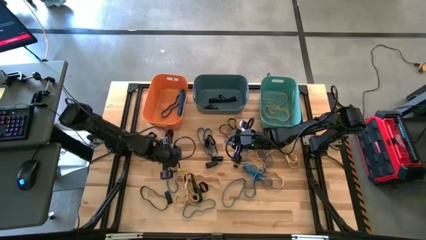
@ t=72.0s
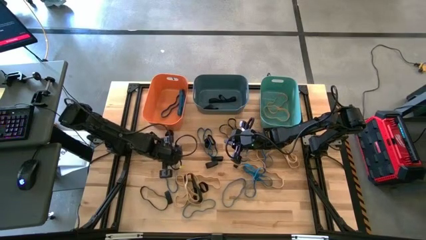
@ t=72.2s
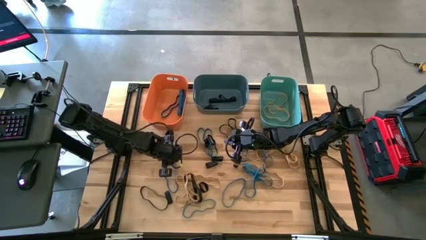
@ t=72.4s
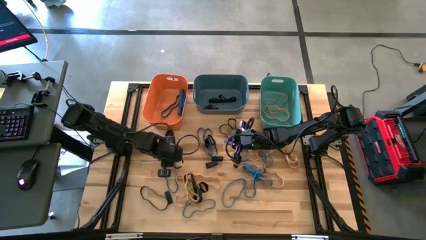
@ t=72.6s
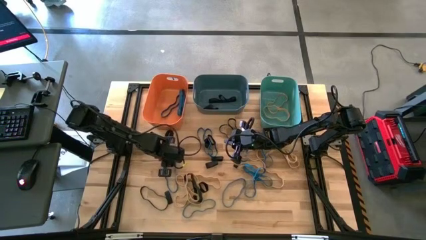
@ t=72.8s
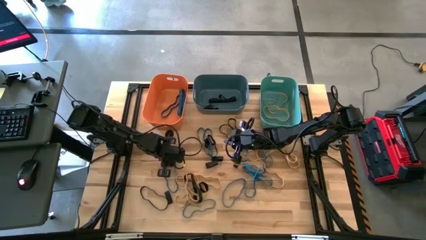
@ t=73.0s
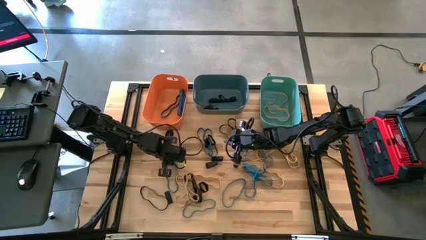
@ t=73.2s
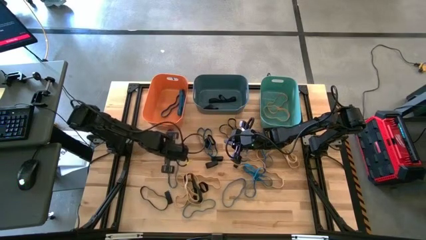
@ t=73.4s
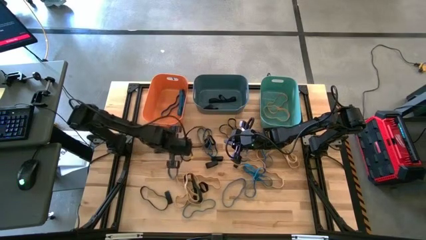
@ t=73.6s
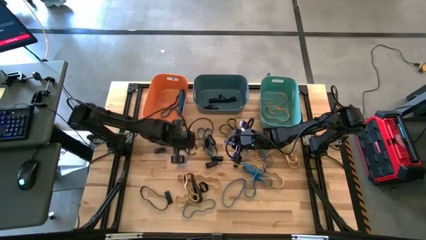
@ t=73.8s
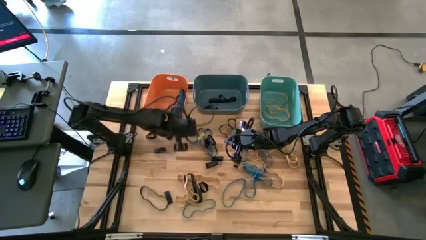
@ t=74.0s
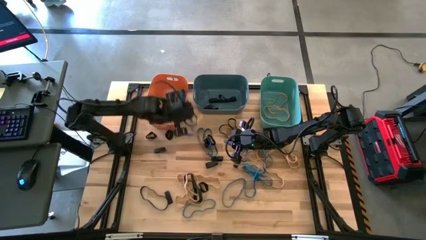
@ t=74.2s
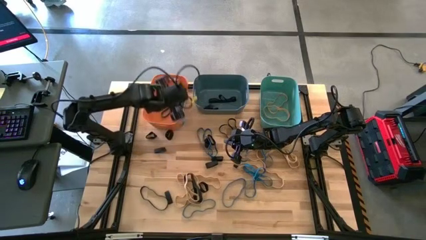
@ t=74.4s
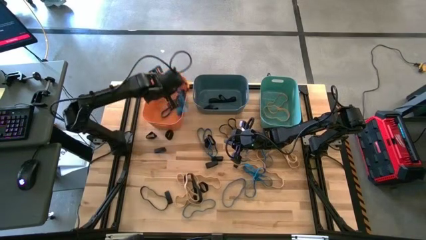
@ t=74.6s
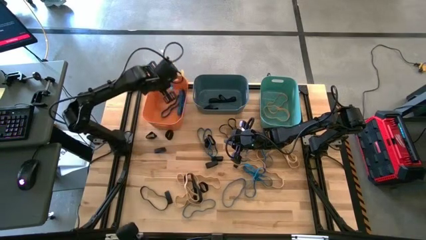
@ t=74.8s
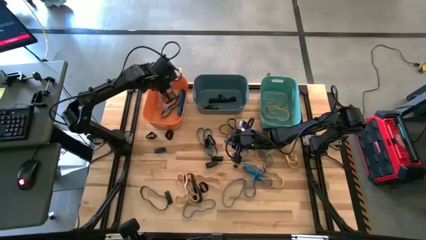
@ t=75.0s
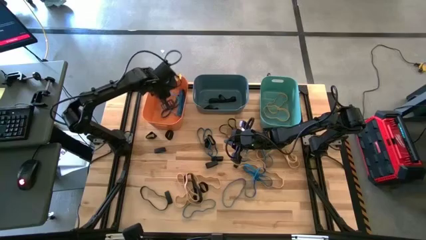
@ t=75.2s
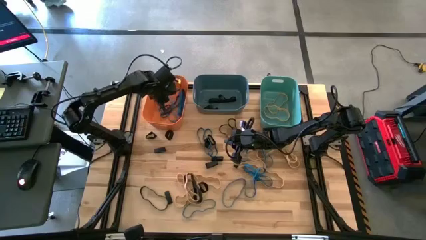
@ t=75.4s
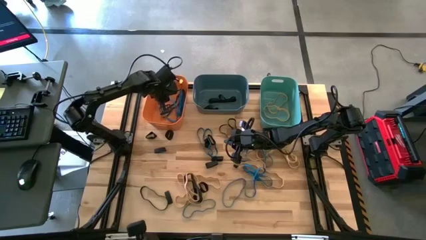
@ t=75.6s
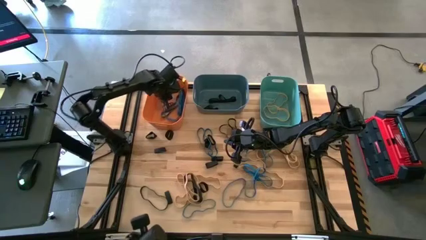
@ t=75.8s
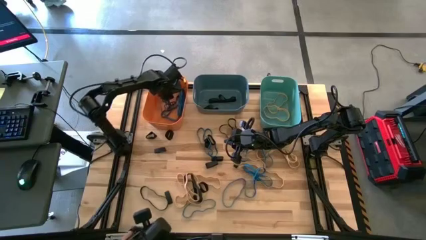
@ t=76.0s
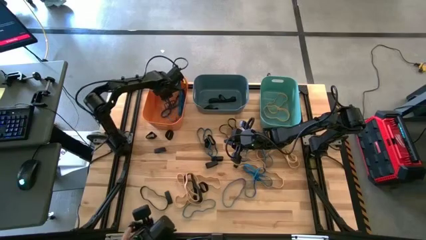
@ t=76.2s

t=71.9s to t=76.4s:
Task: Sort rubber bands into baskets
Put the blue rubber band into the orange bin

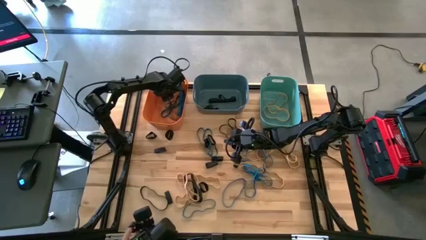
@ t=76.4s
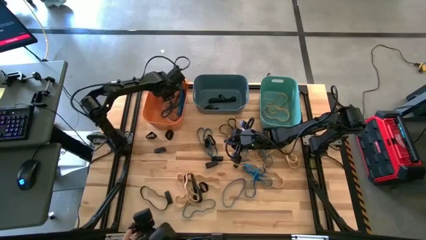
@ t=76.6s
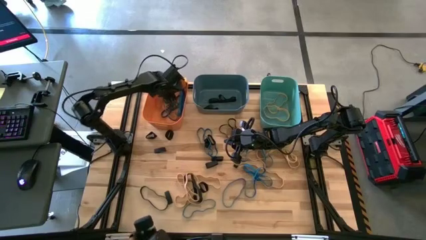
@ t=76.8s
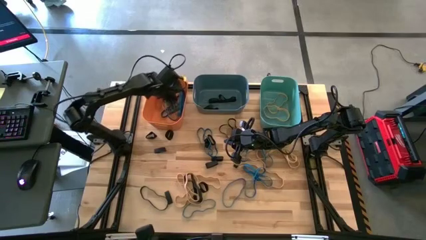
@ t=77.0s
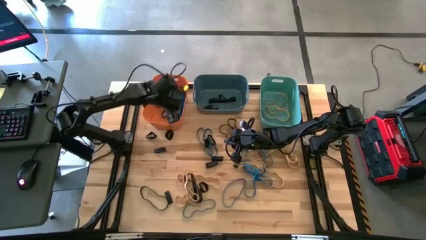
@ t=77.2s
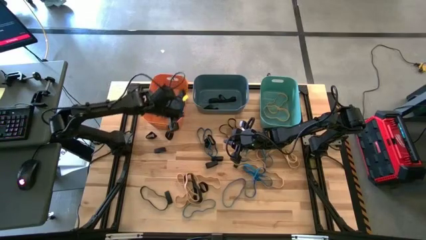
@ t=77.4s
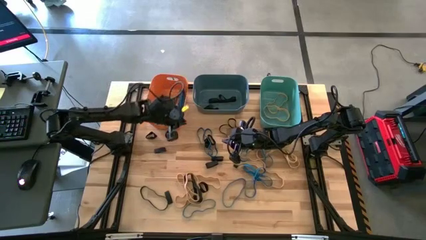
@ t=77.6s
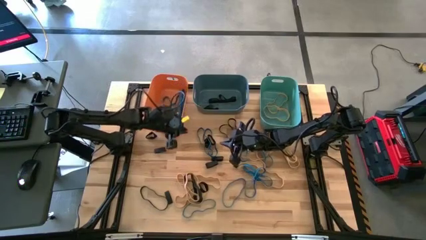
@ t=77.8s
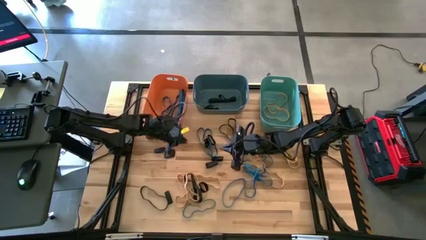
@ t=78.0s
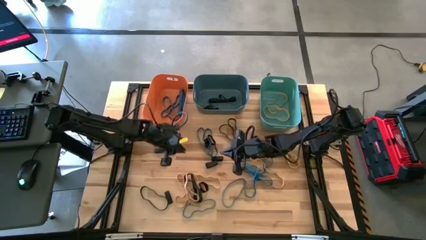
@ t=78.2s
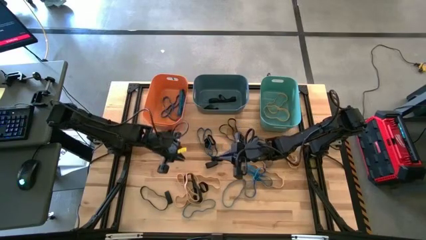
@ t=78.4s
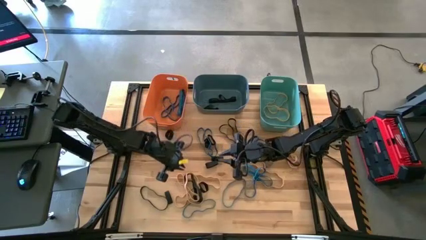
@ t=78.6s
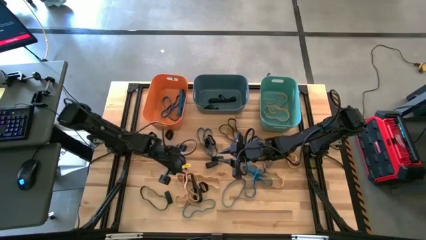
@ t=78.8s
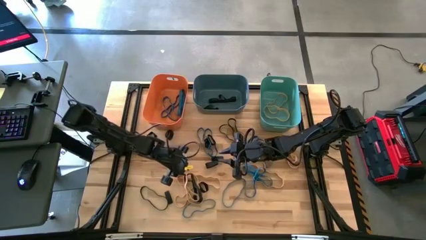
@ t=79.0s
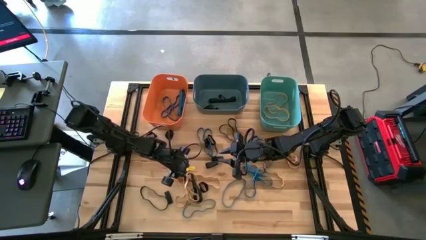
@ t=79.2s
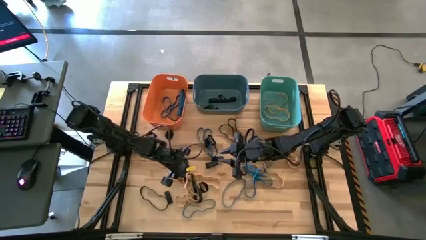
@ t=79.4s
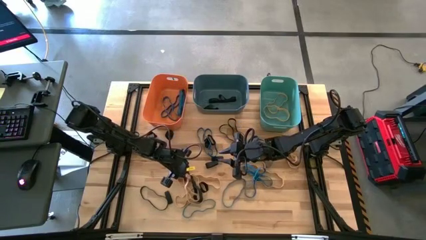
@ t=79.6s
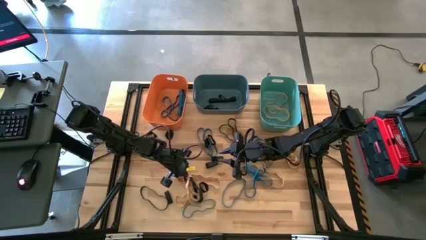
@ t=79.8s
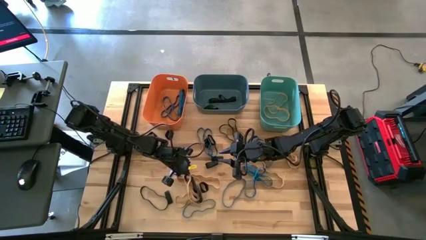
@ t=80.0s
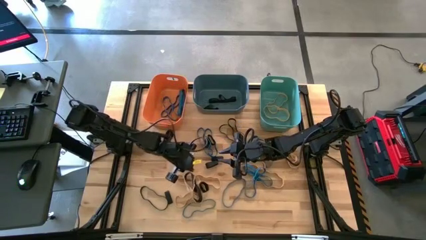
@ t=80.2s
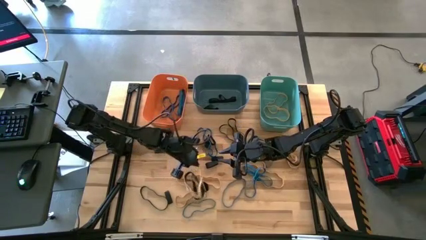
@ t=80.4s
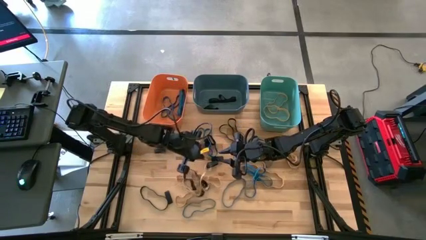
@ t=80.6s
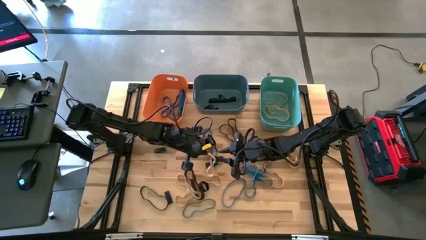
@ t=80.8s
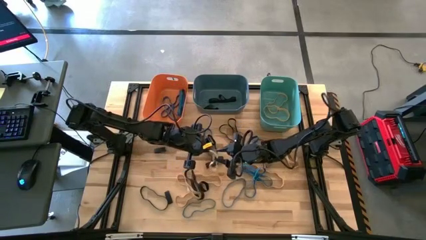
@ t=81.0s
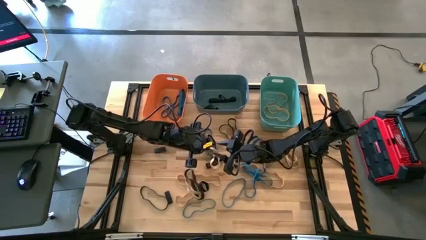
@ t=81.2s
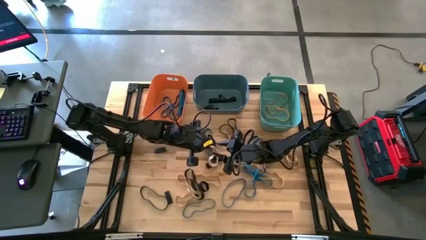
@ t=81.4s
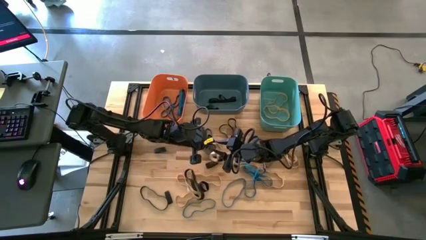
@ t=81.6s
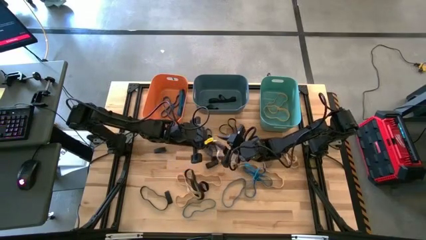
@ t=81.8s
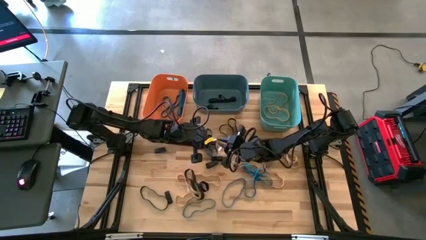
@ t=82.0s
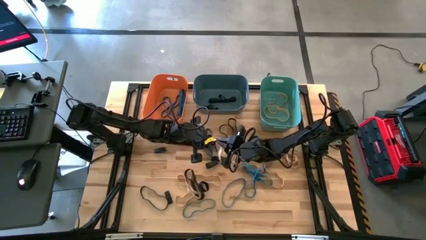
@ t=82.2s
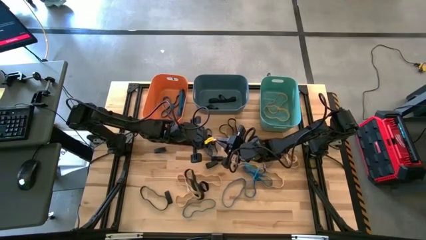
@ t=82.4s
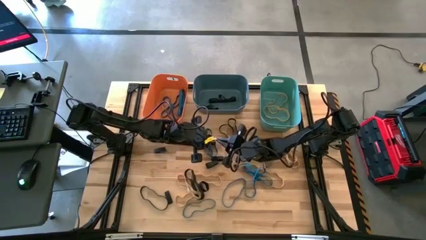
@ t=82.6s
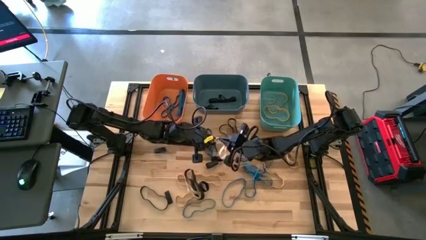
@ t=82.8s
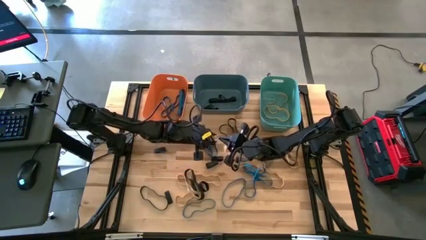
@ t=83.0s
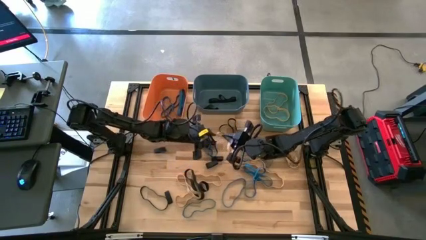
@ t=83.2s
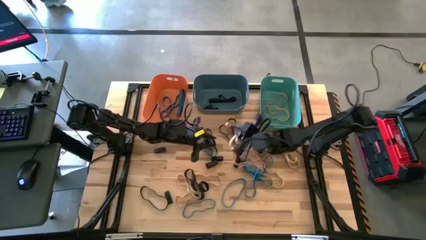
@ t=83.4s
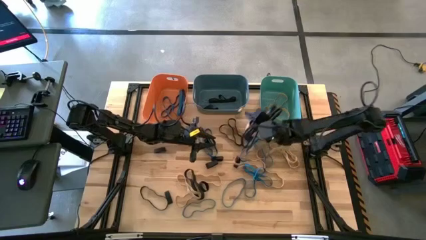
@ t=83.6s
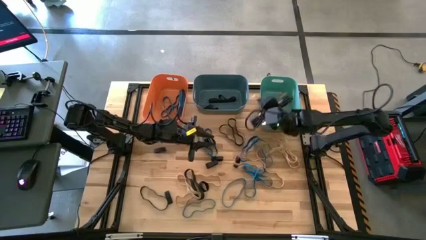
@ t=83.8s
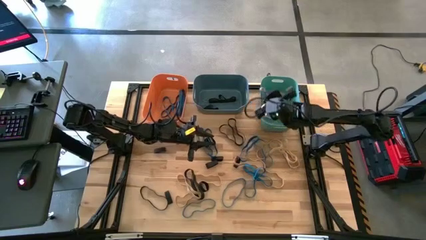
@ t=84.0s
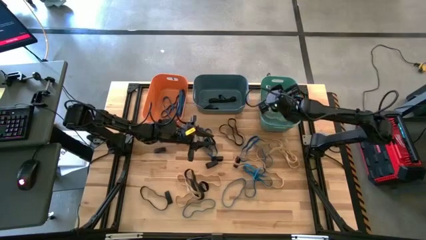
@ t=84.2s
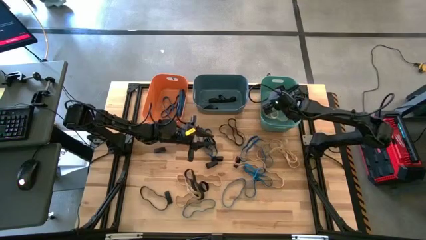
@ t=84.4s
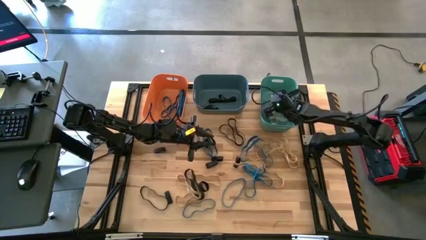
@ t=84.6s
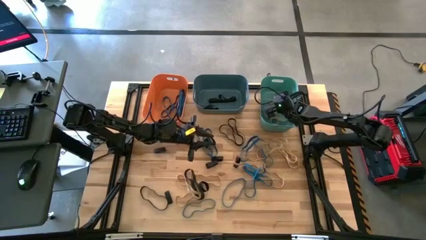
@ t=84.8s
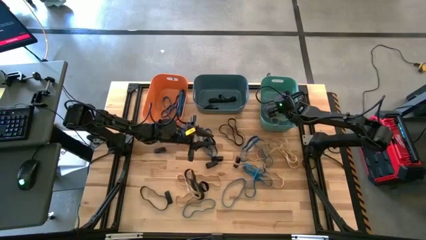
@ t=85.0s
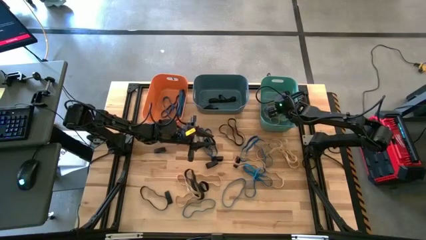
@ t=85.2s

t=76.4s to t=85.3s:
Put the brown rubber band into the green bin

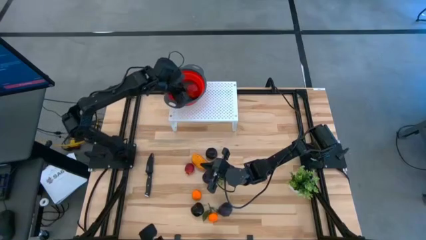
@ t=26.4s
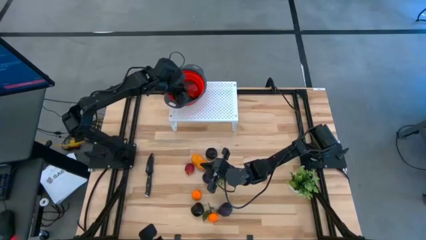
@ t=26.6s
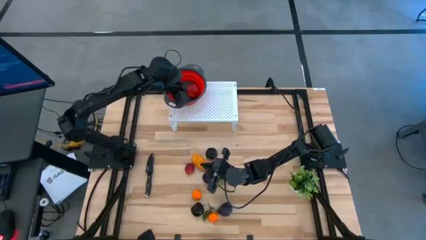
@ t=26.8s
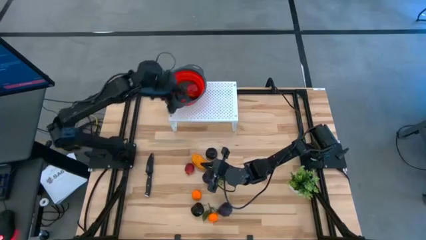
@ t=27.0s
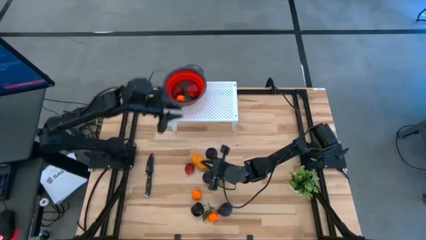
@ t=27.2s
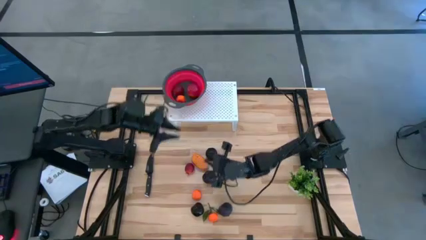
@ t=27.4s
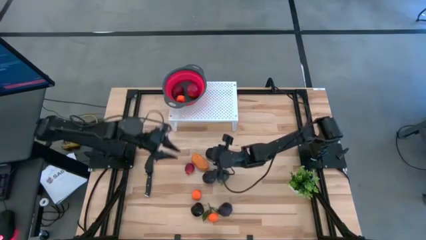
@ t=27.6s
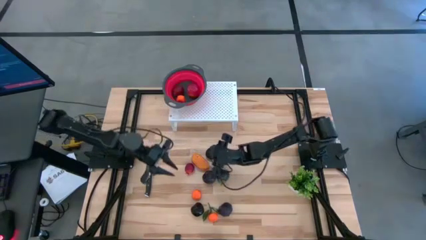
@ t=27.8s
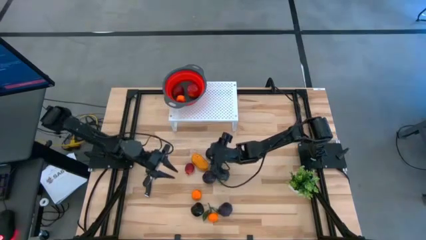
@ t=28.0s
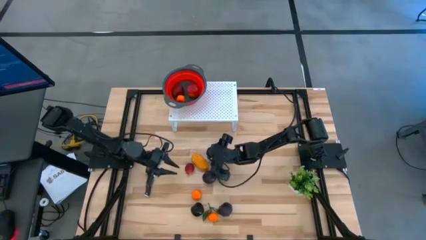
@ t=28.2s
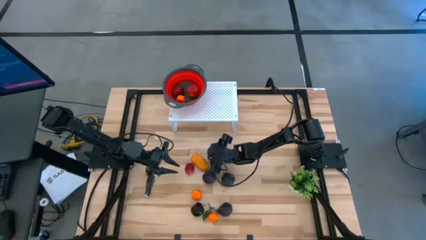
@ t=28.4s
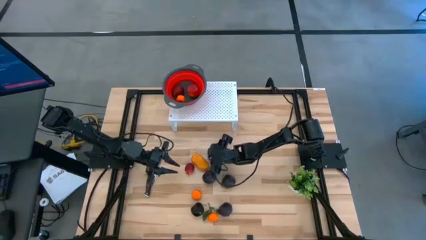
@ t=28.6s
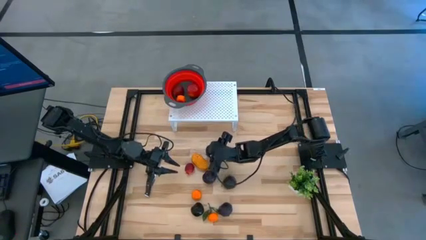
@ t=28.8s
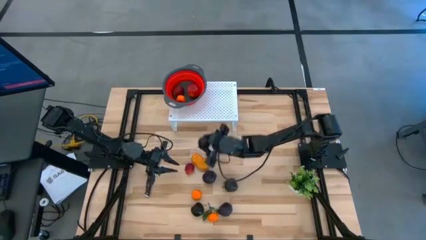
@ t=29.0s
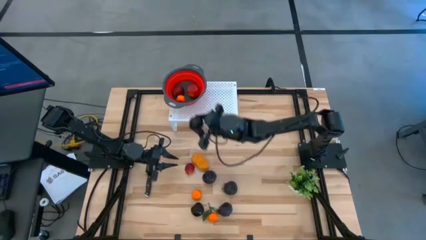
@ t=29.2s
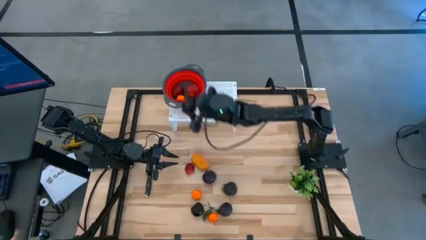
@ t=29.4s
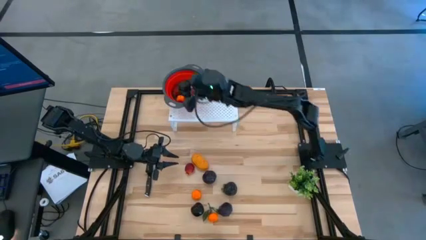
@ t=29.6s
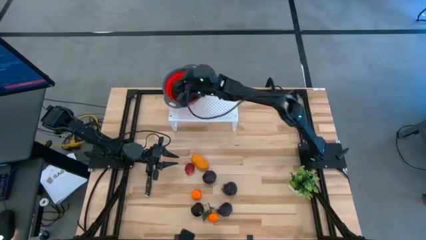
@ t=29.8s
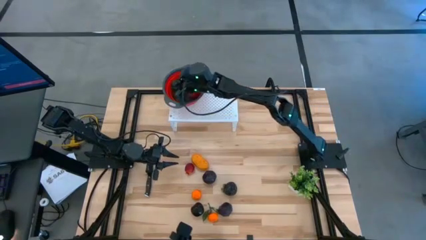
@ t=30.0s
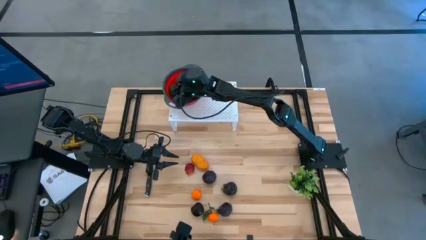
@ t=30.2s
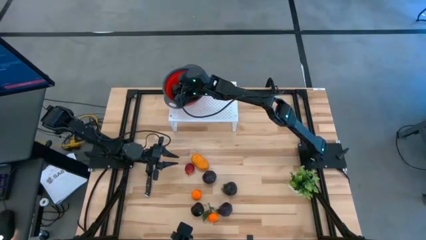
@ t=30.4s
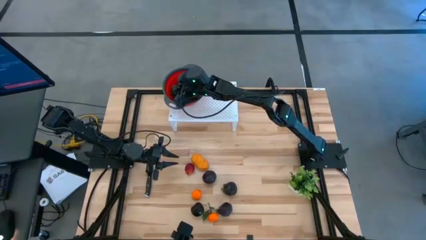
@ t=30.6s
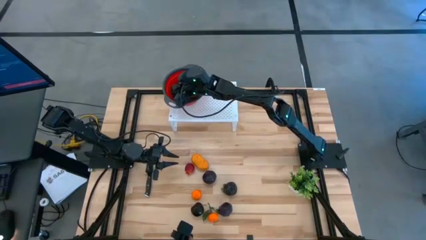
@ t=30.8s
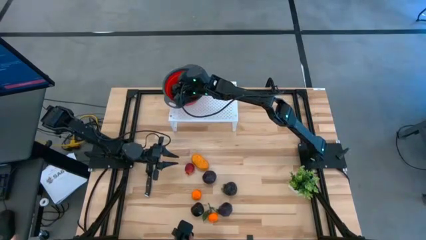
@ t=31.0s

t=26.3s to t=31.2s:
Task: Pick & Place Fruit
Put the purple plum into the red strainer bowl on the shelf
